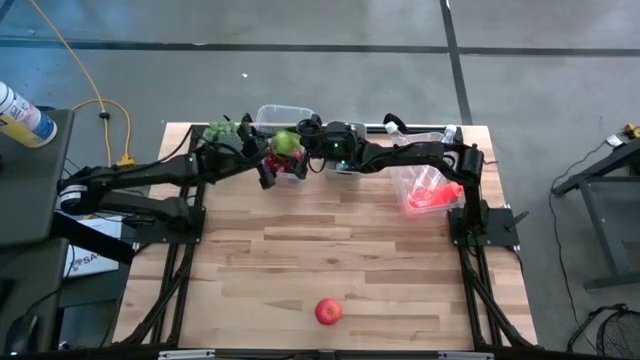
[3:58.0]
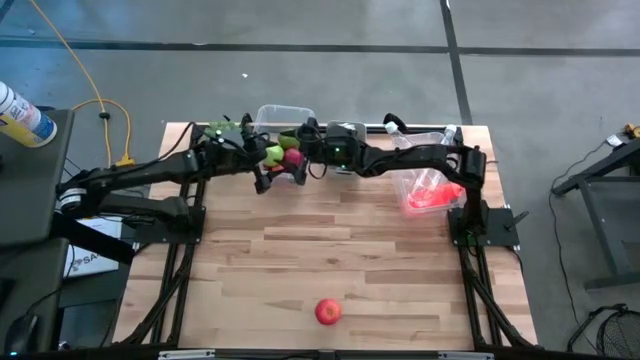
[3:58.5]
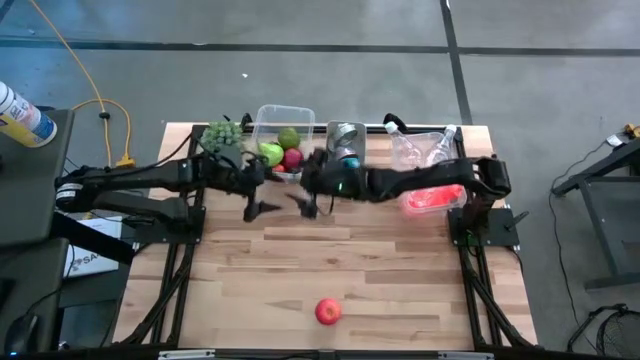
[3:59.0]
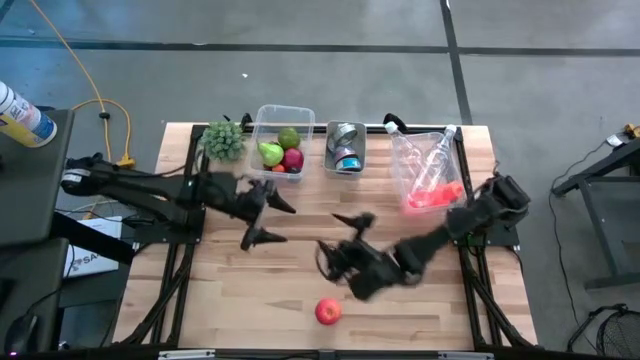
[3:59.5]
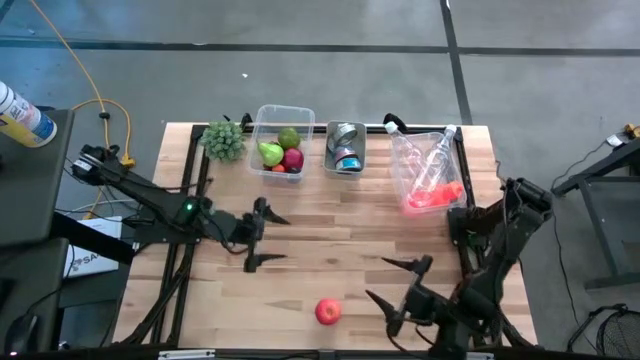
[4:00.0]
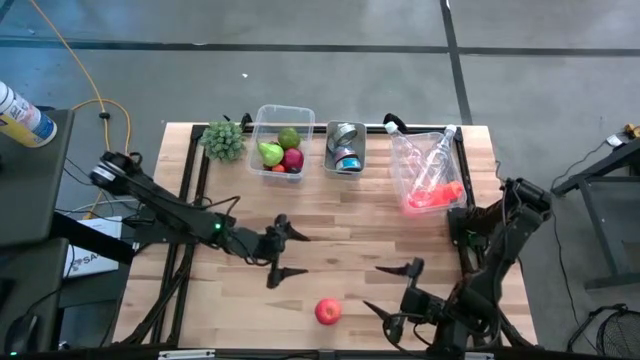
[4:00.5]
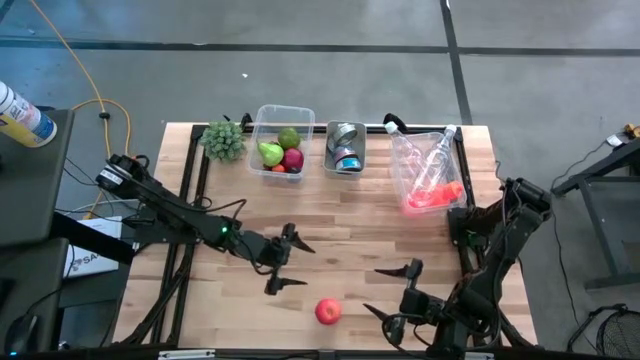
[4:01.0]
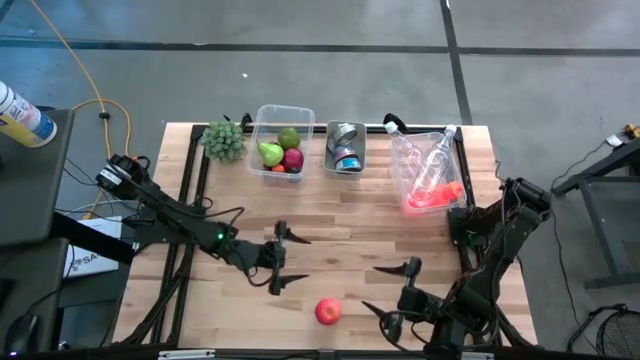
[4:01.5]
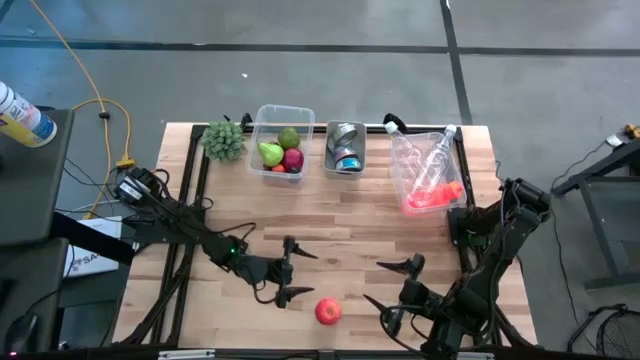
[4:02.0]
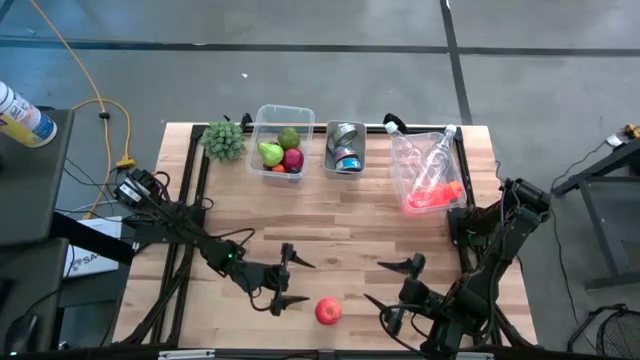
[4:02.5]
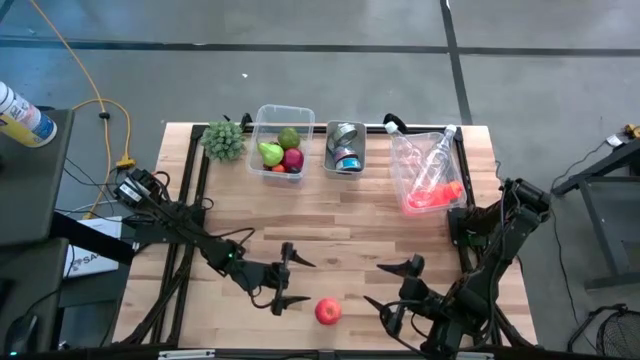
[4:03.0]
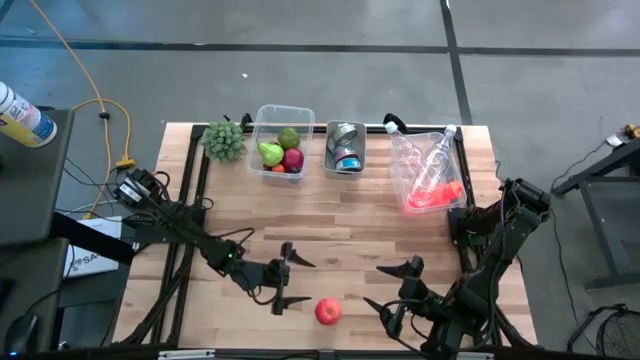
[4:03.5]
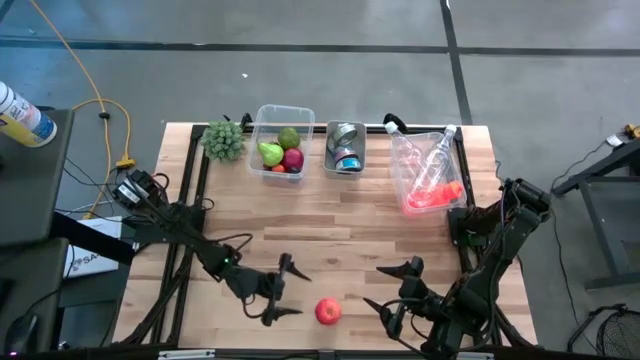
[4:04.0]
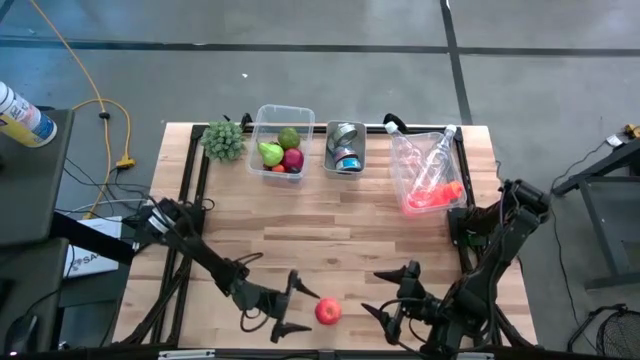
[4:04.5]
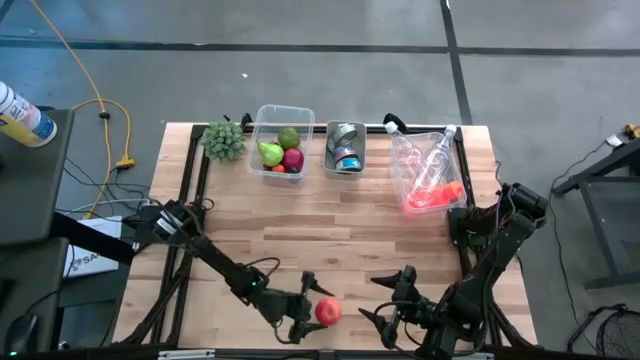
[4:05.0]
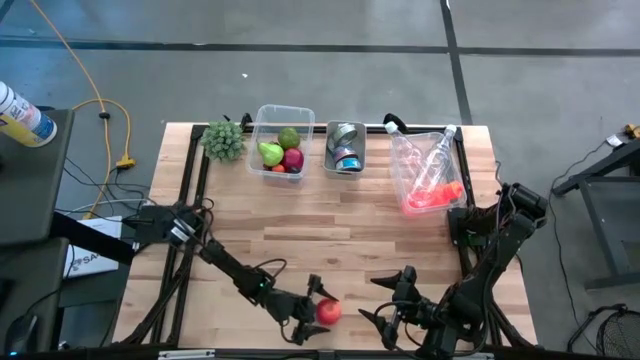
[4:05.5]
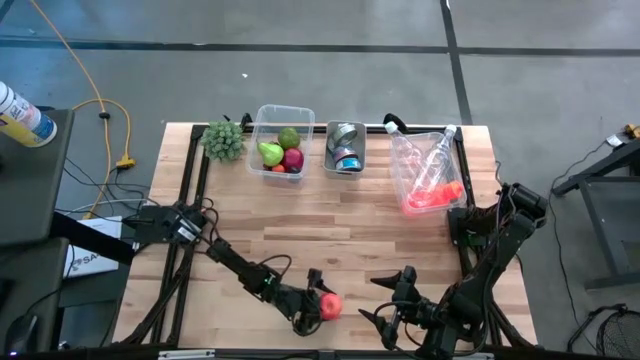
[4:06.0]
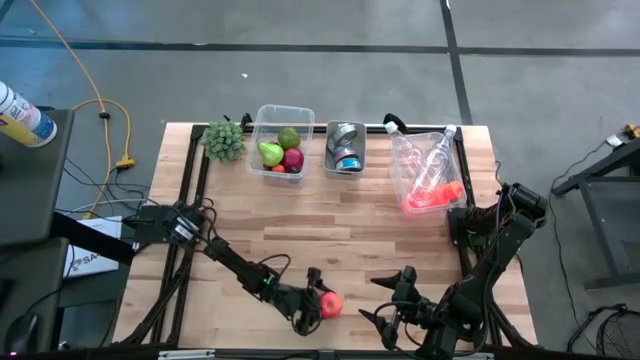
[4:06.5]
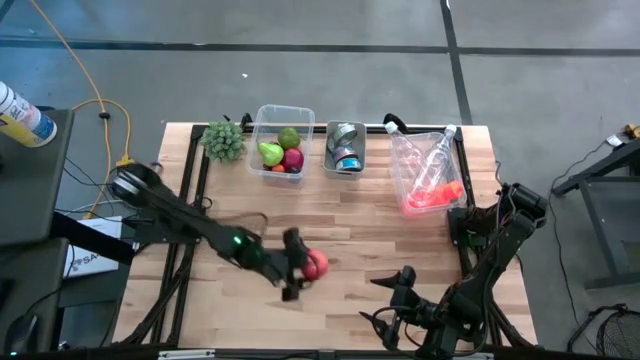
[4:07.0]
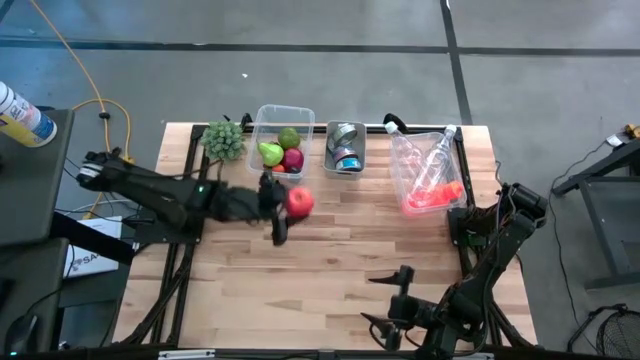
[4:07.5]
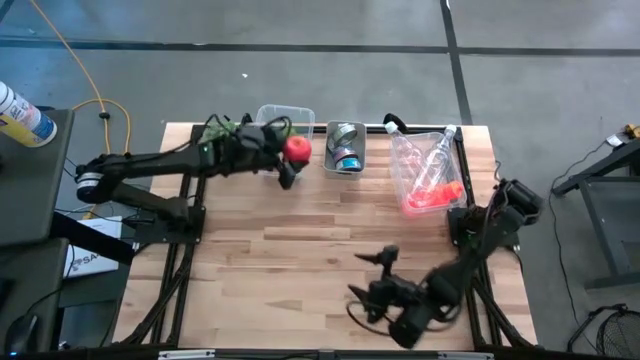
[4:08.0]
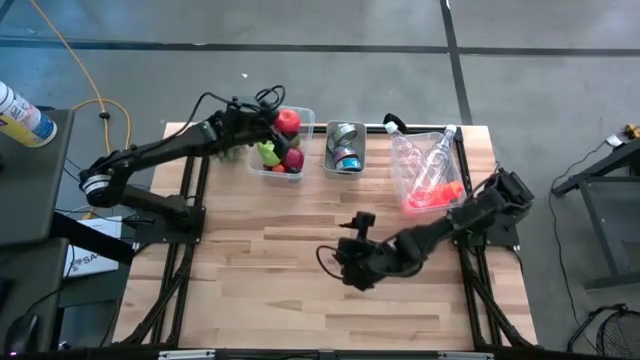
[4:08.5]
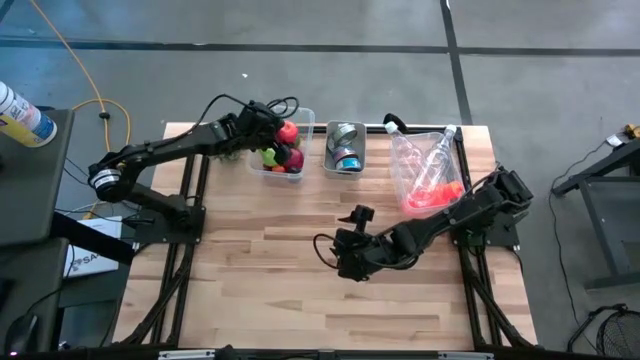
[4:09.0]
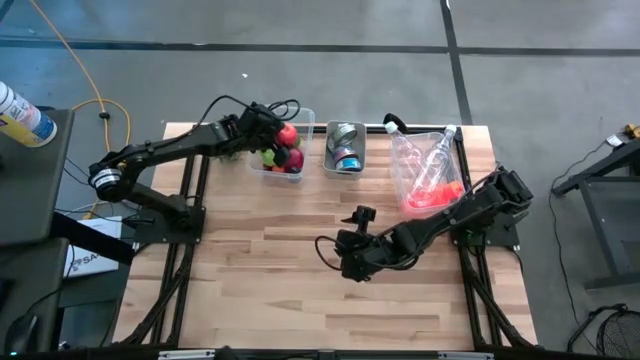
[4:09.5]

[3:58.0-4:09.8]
Task: Pick & Place Food Item
Put the red apple into the left transparent bin

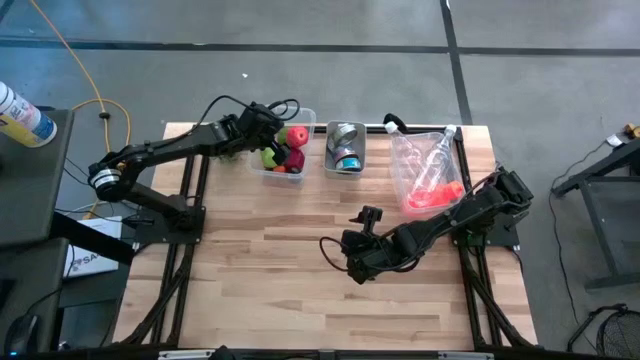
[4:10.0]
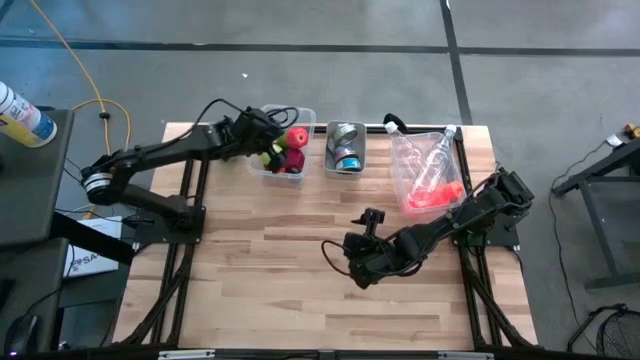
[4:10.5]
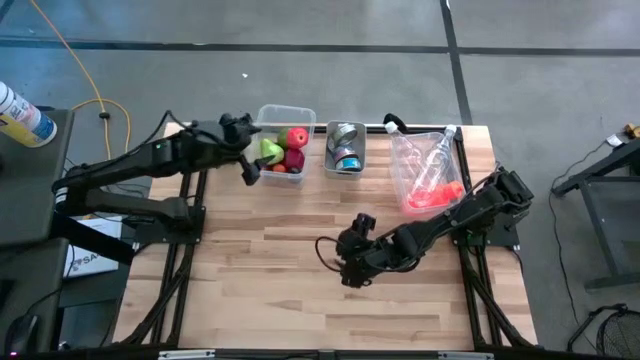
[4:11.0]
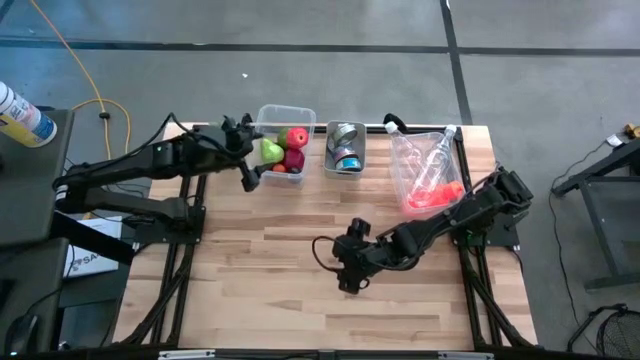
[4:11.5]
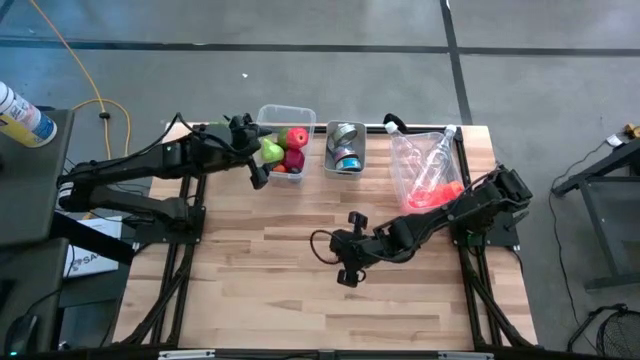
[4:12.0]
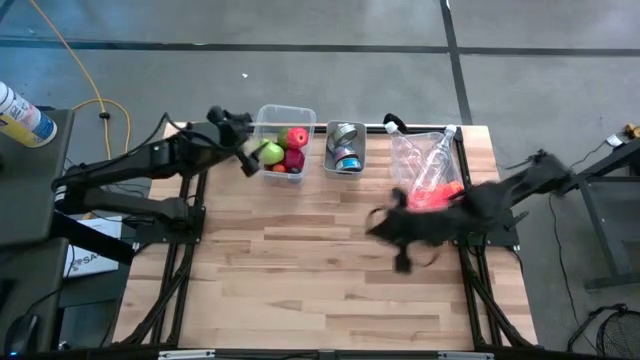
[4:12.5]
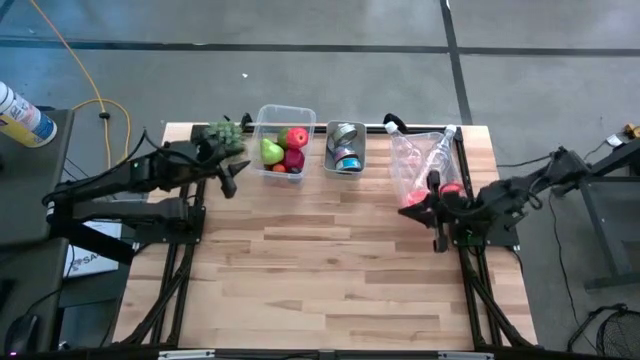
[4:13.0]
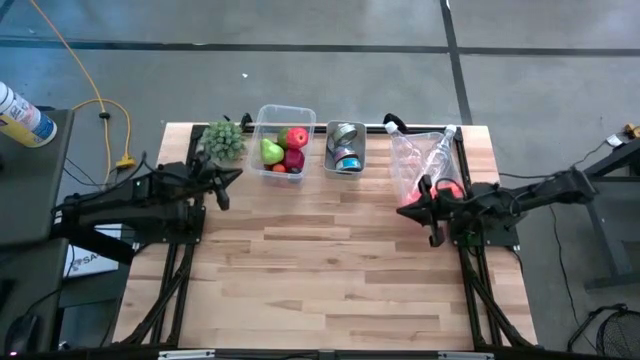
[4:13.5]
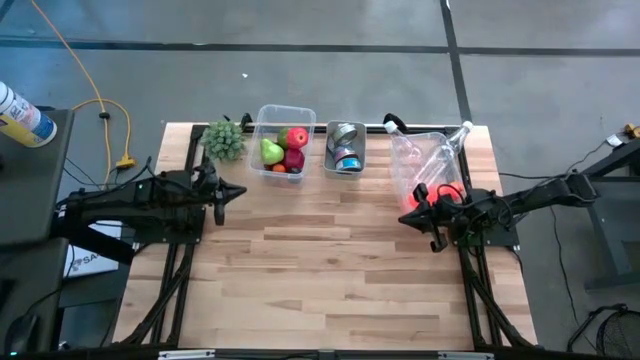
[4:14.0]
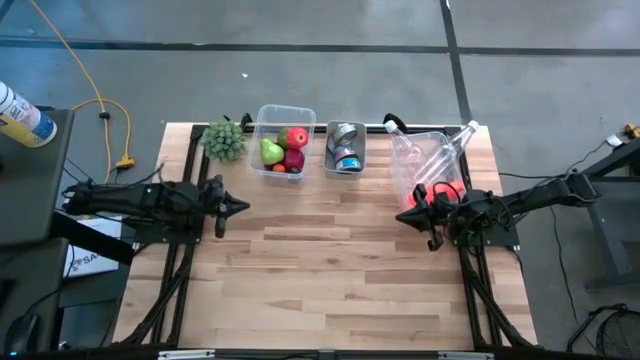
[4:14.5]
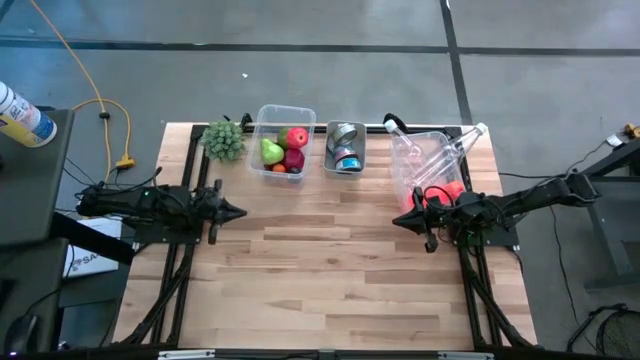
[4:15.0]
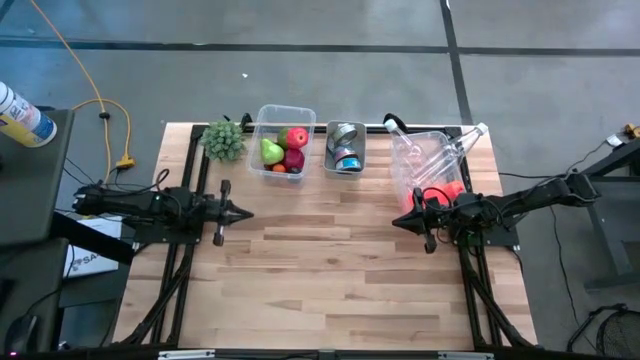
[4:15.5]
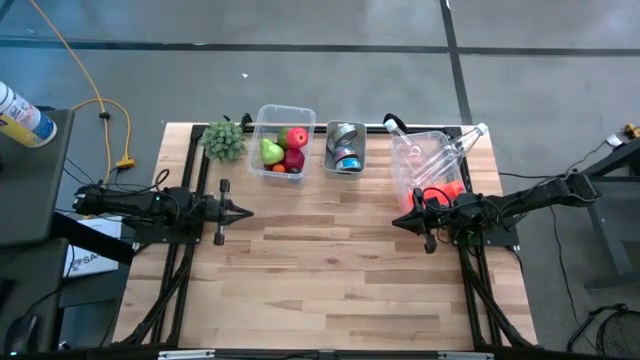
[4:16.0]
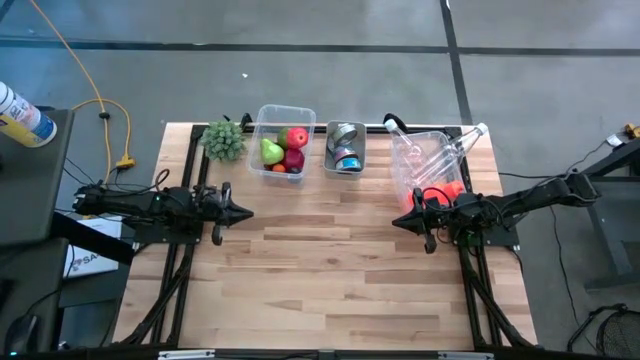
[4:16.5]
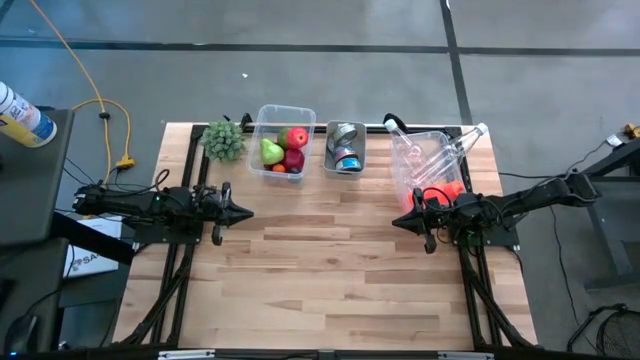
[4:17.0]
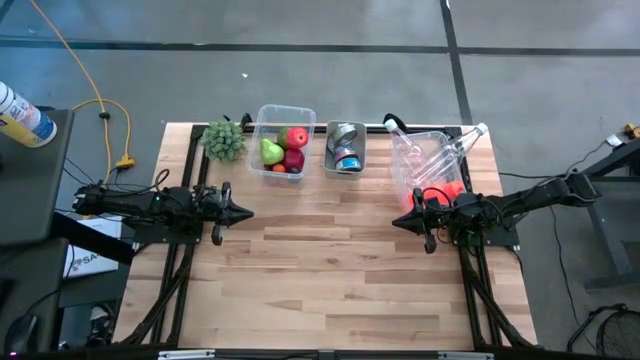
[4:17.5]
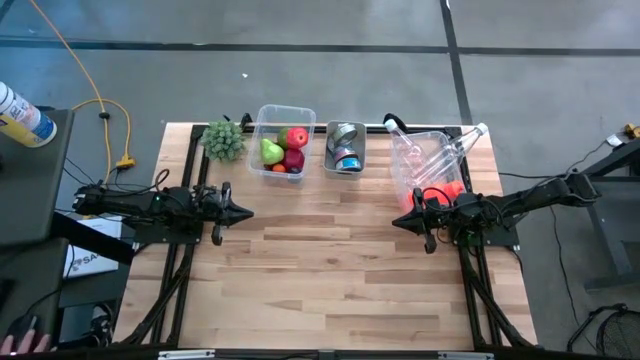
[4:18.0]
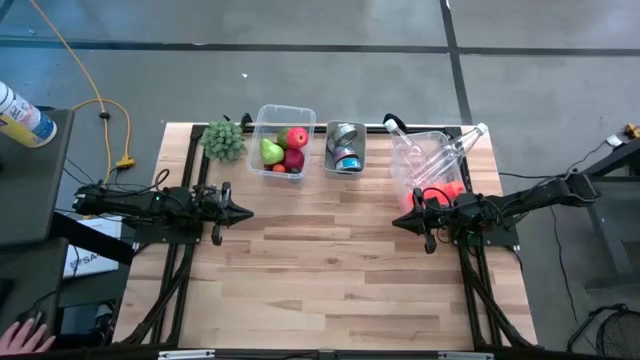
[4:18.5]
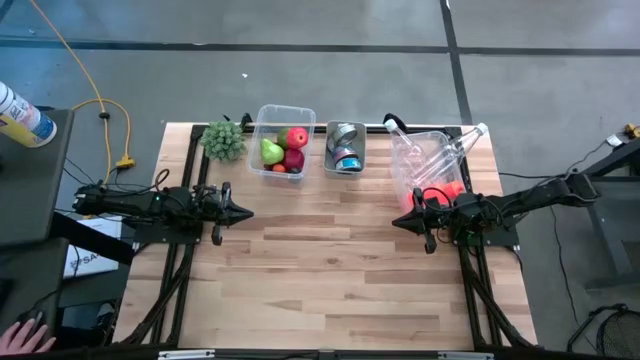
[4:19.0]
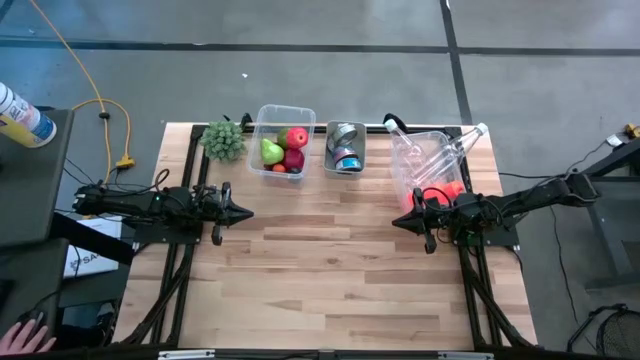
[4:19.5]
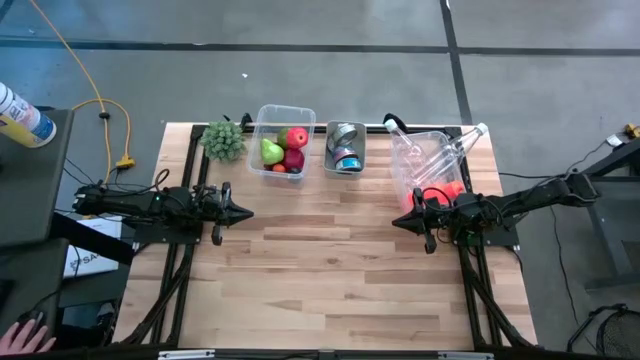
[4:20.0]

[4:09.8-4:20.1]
Return to Home Position
